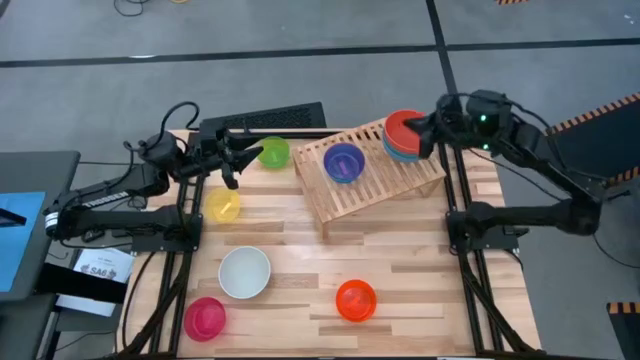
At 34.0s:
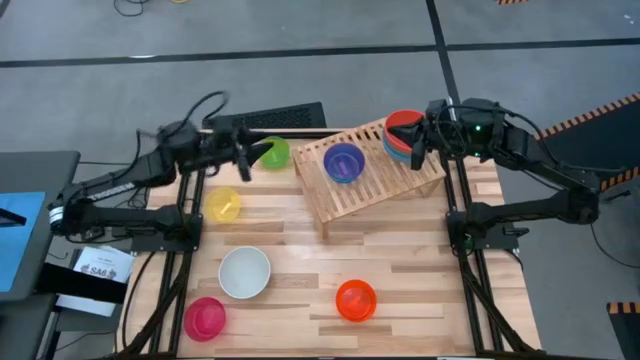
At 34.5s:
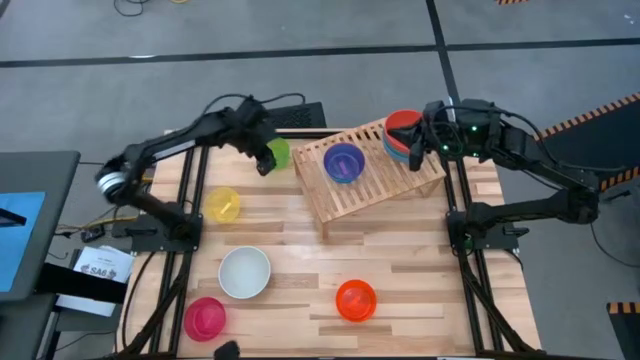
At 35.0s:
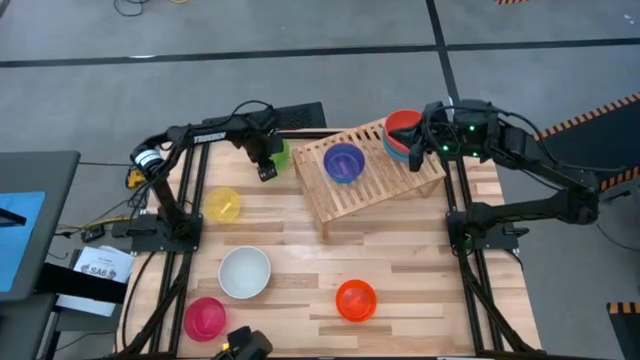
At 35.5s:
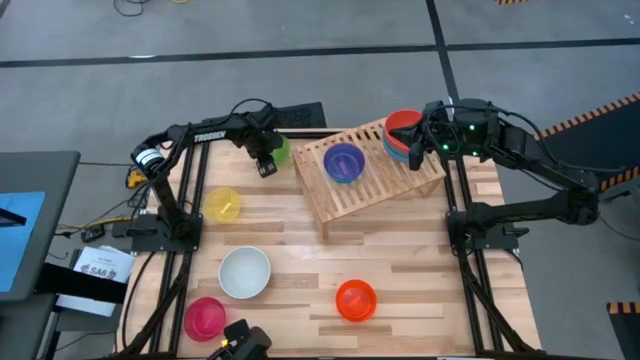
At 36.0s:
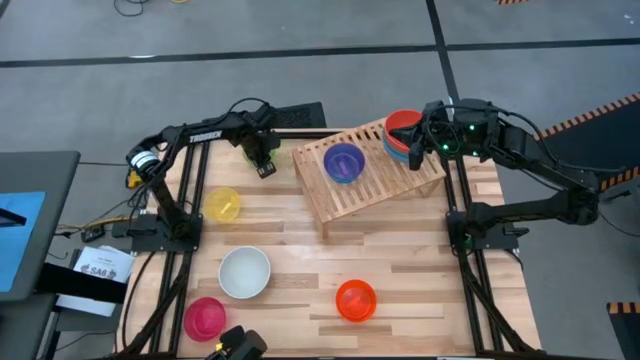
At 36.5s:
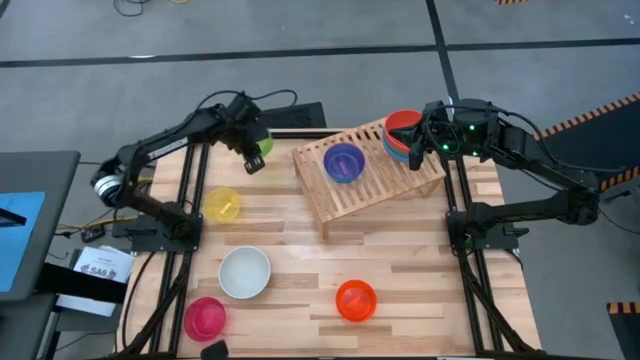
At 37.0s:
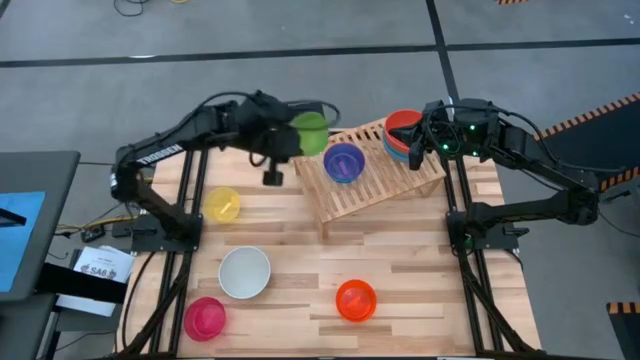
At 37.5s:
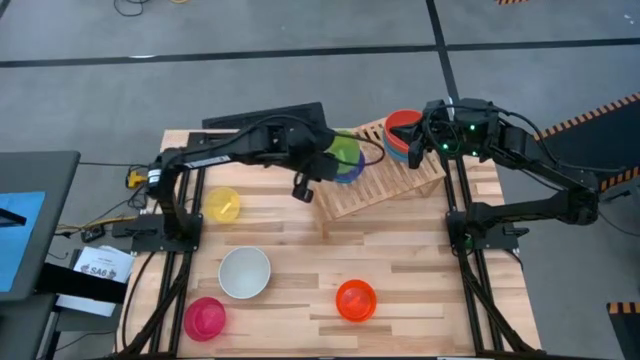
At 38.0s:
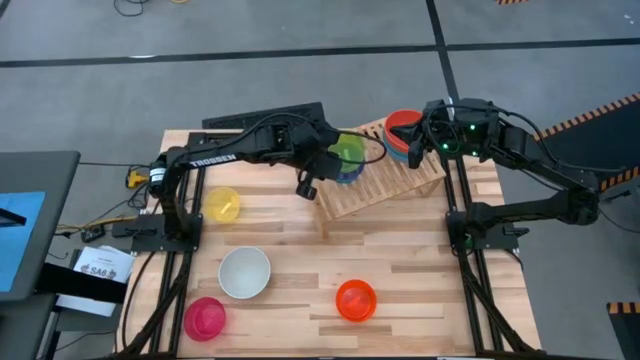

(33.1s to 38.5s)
Task: Place and stack bowls onto a shelf
Stack the small green bowl on top of the small violet bowl on the shelf

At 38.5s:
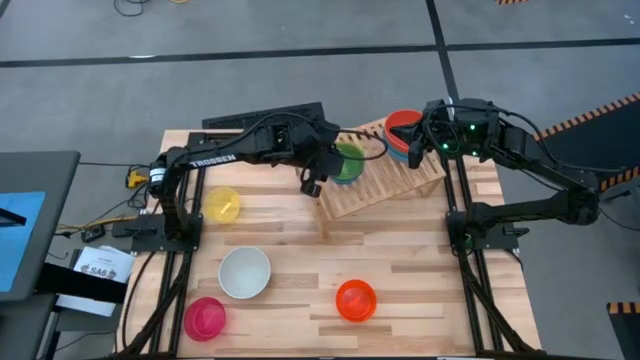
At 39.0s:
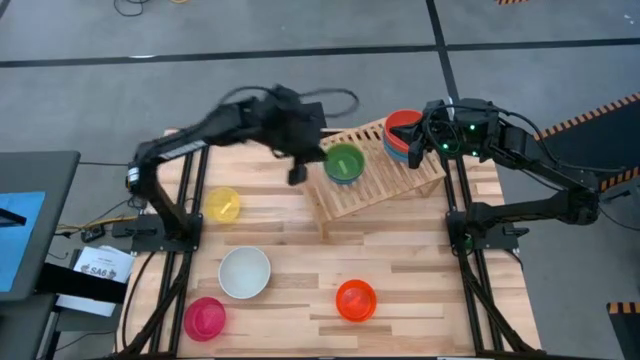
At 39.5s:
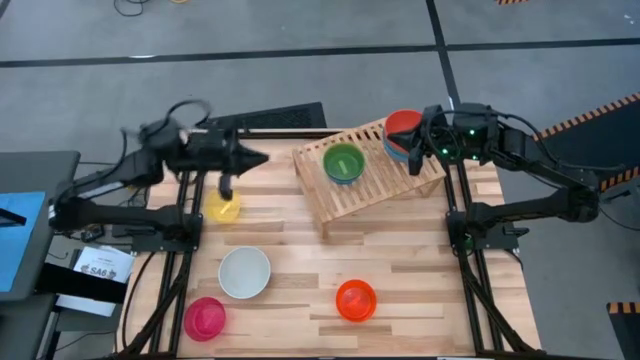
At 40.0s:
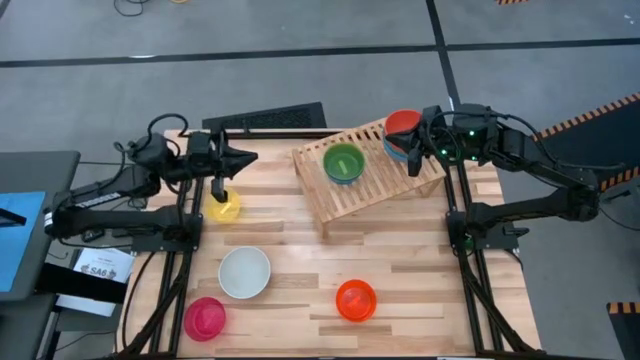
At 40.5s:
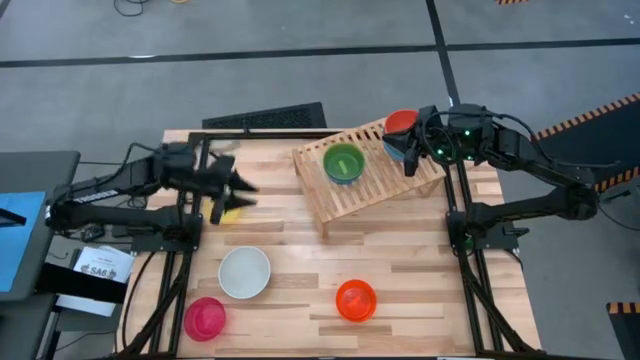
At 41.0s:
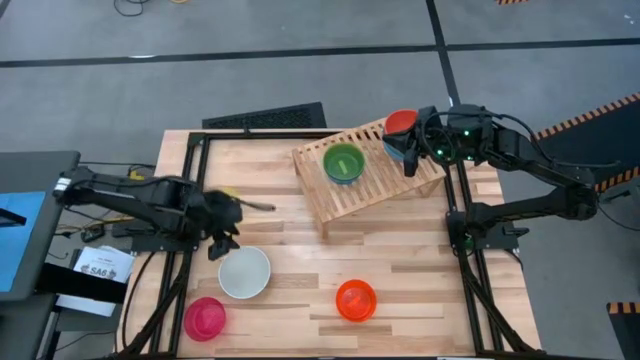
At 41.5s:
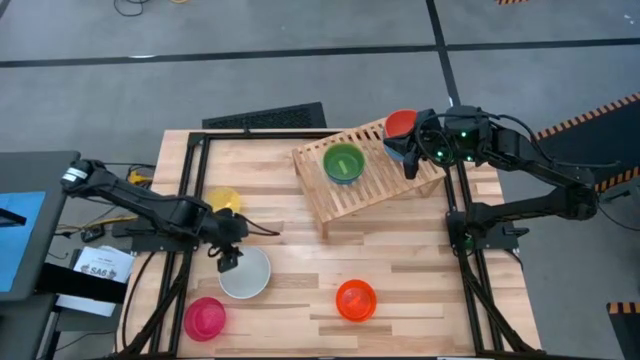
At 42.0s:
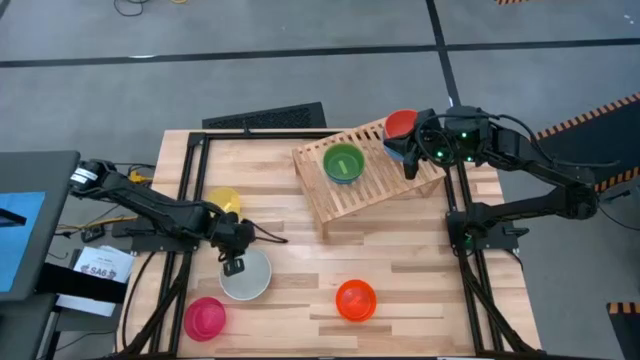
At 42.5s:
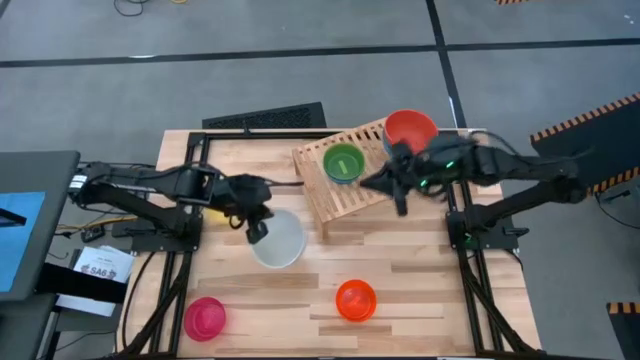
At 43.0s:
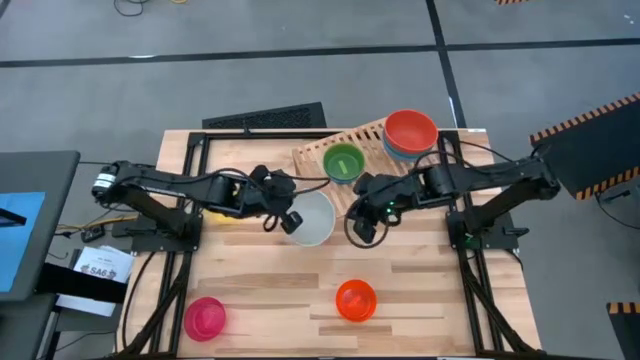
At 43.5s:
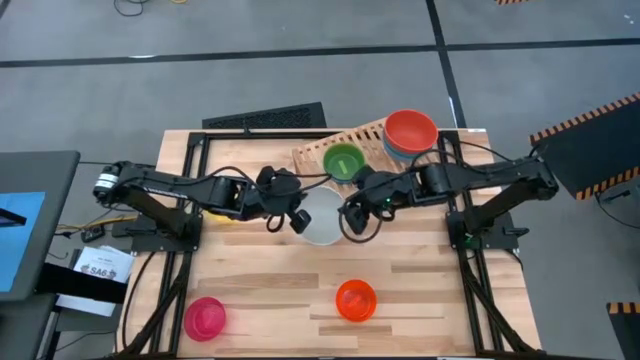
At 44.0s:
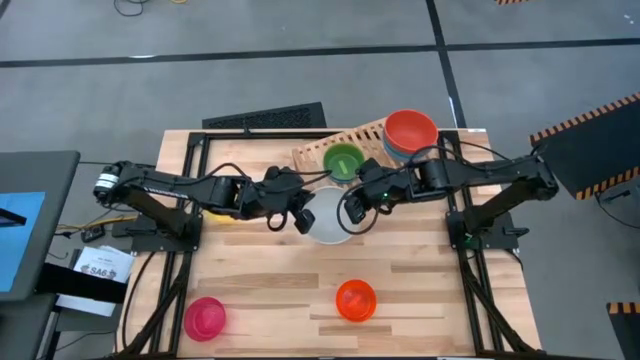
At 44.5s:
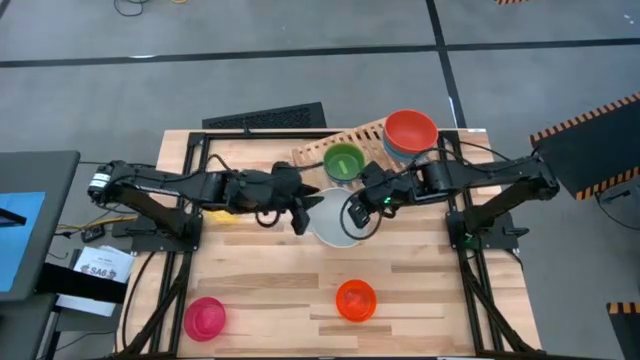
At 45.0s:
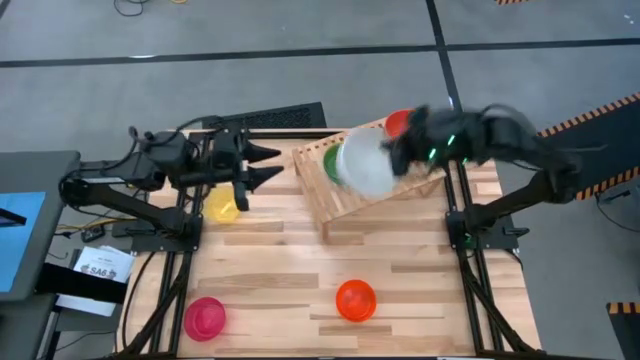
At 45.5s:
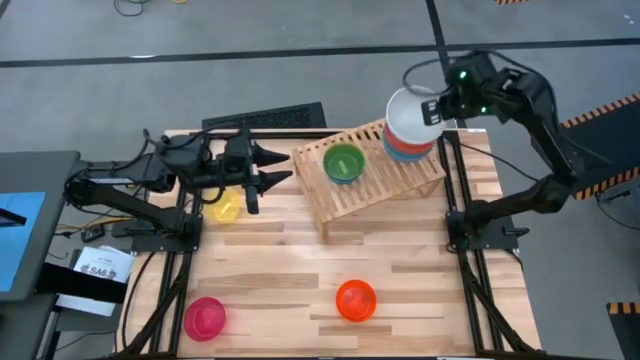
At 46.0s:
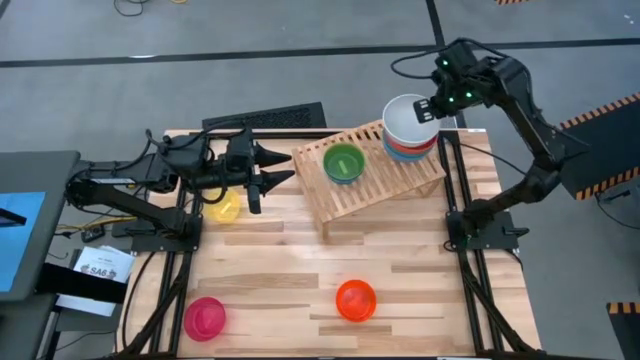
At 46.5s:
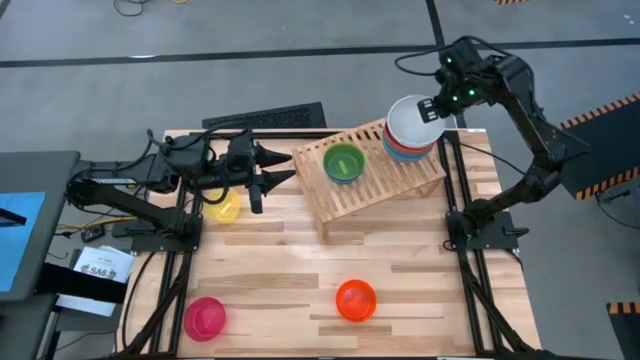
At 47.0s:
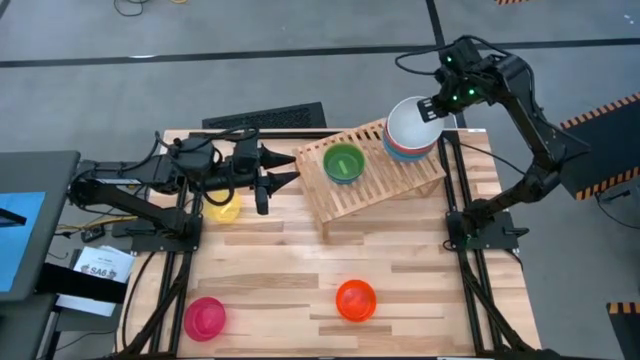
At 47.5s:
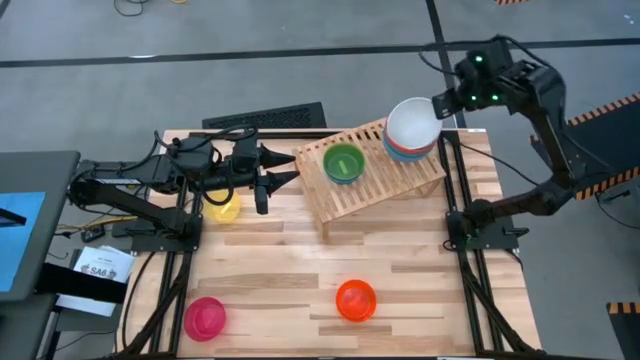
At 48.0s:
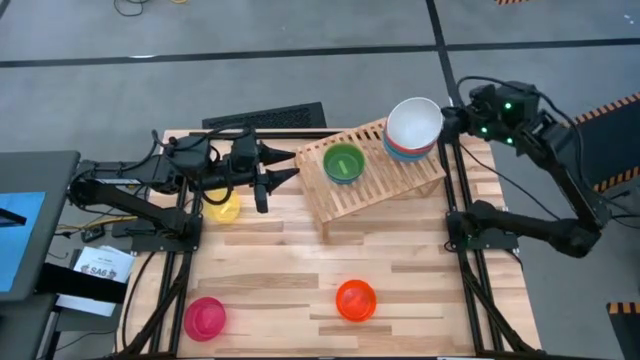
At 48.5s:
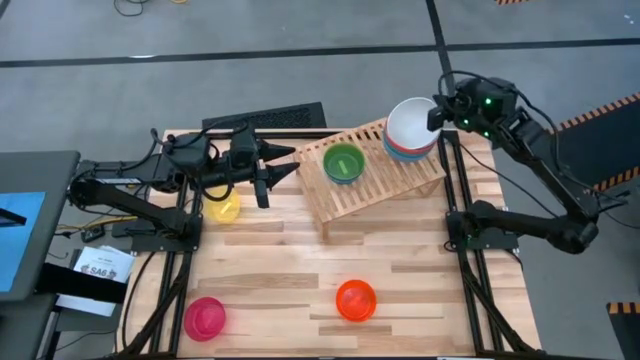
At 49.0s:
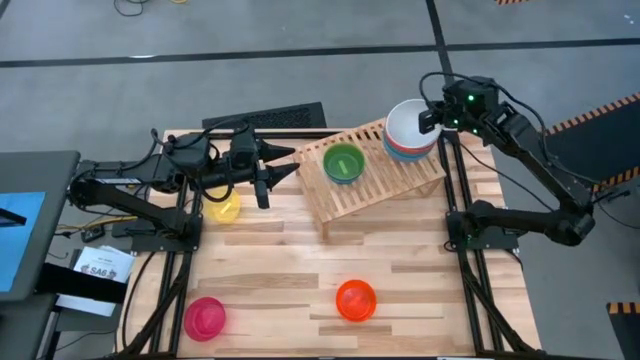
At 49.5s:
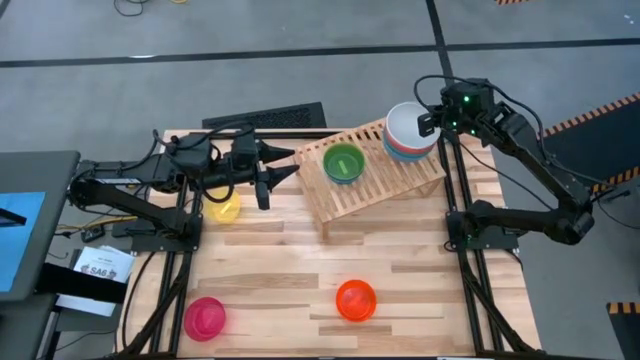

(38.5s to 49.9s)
Stack the large white bowl on top of the large orange bowl on the shelf

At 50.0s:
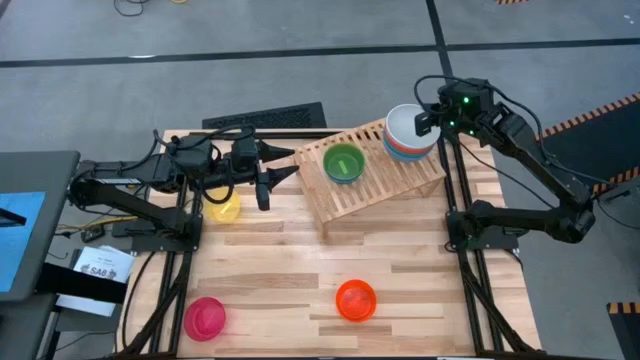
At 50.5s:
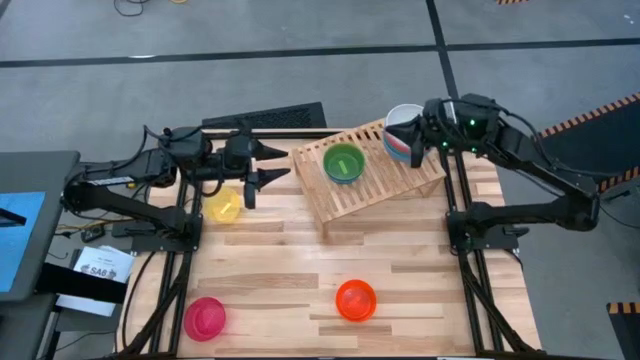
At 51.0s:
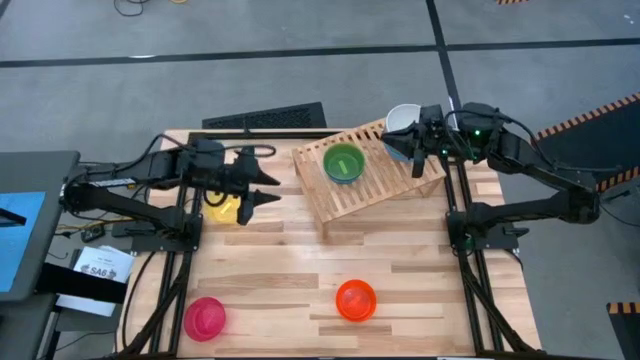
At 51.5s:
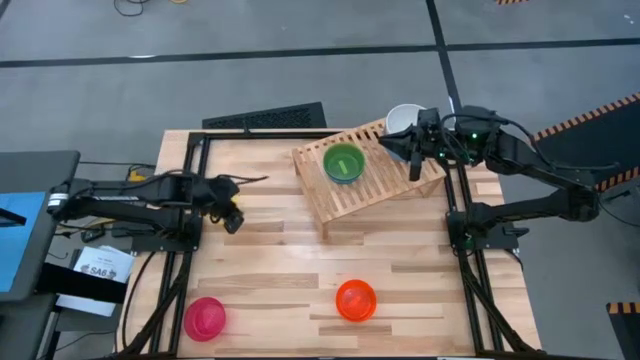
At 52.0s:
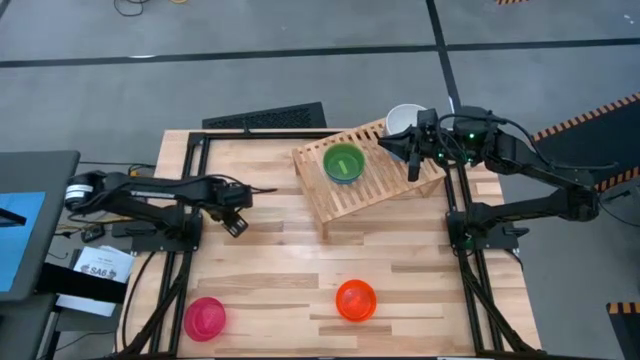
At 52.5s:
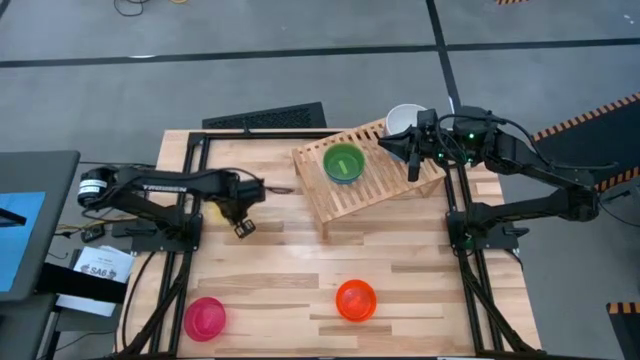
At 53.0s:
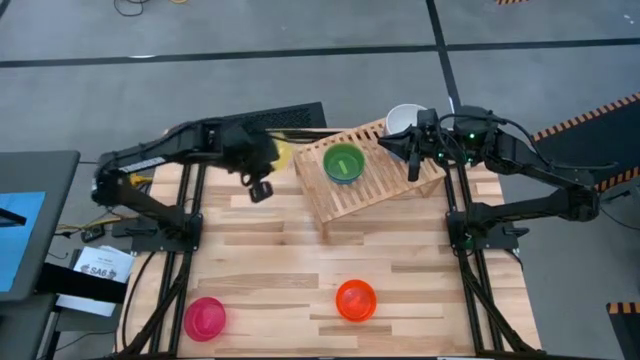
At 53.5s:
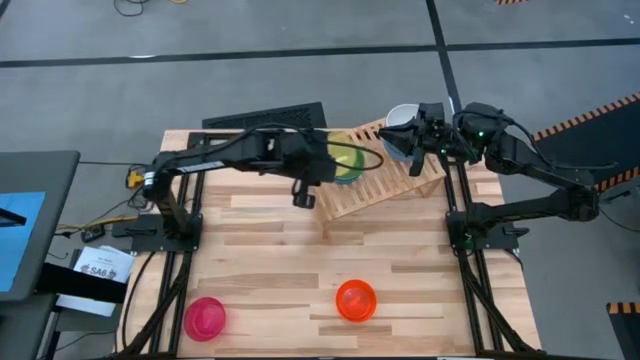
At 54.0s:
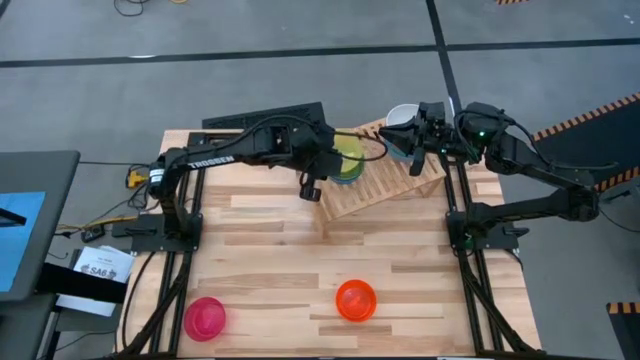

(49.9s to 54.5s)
Stack the small yellow bowl on top of the small green bowl on the shelf
